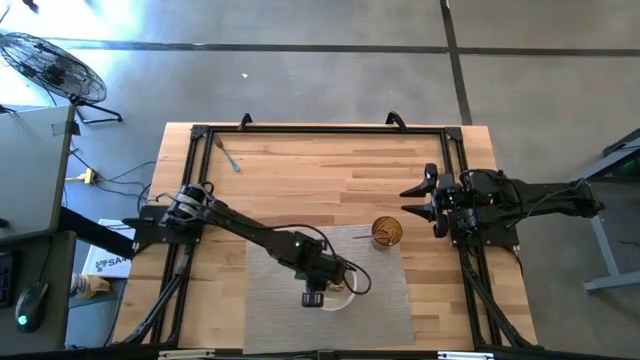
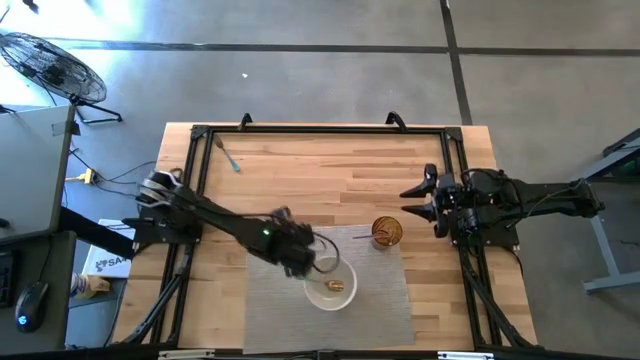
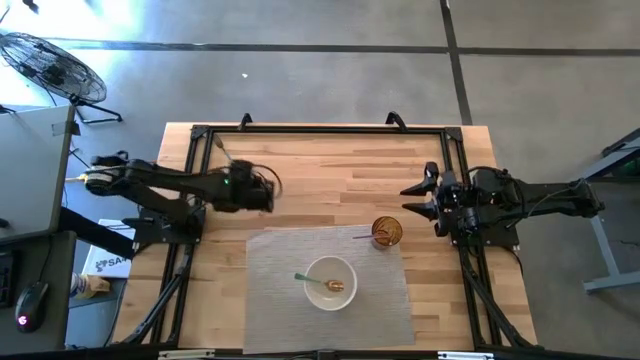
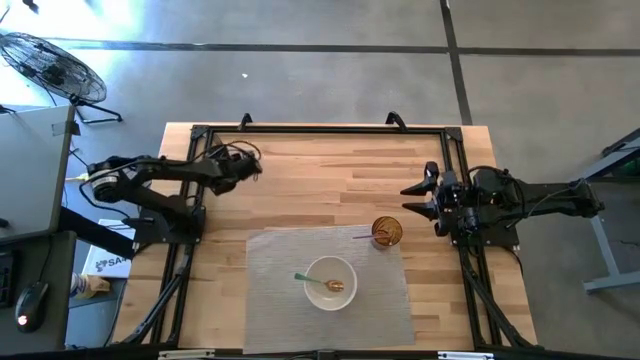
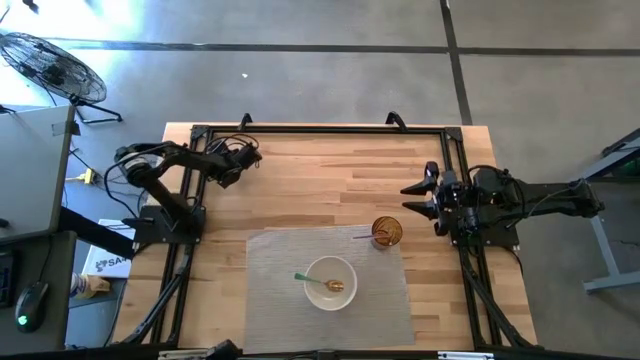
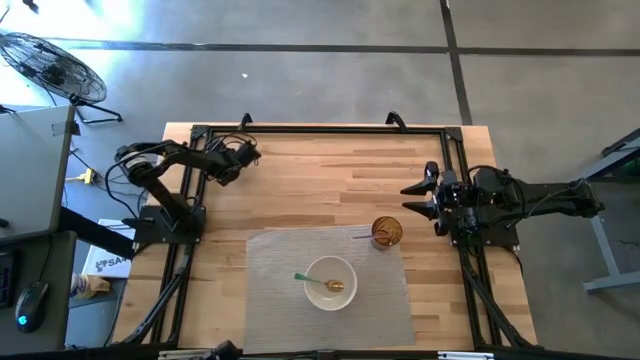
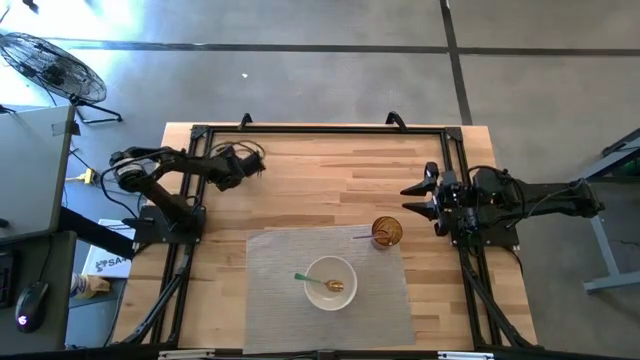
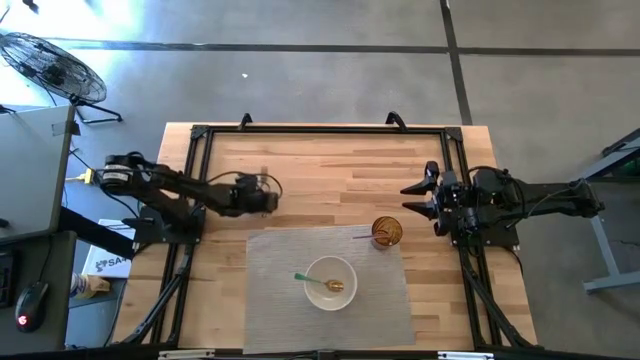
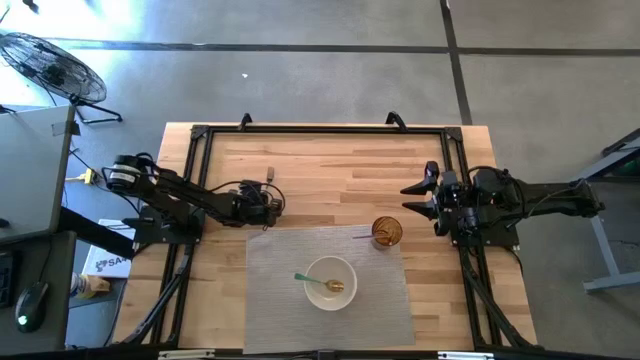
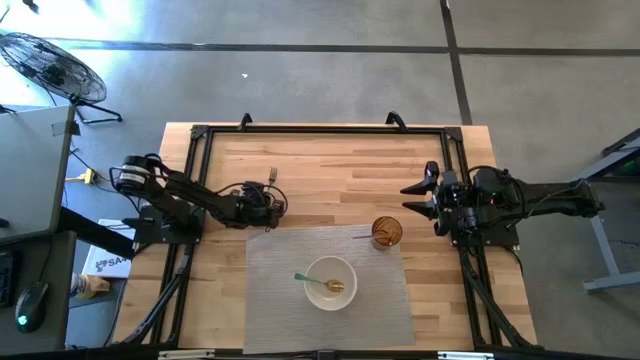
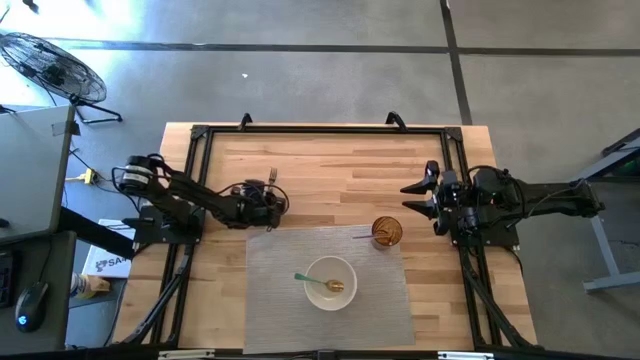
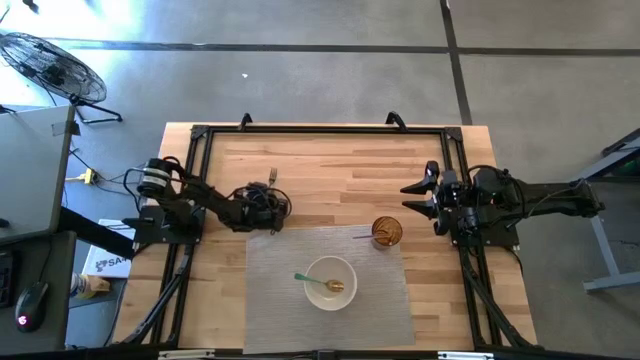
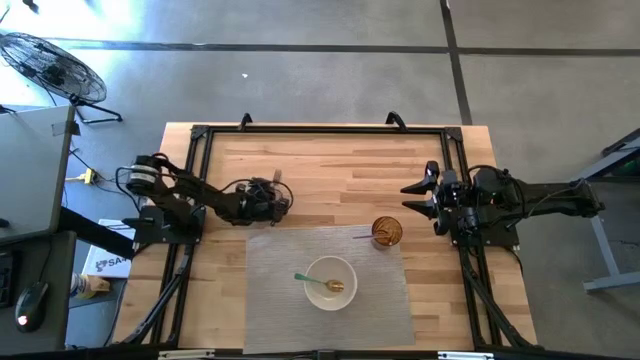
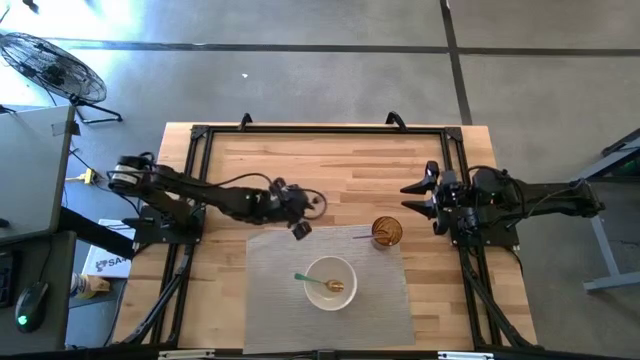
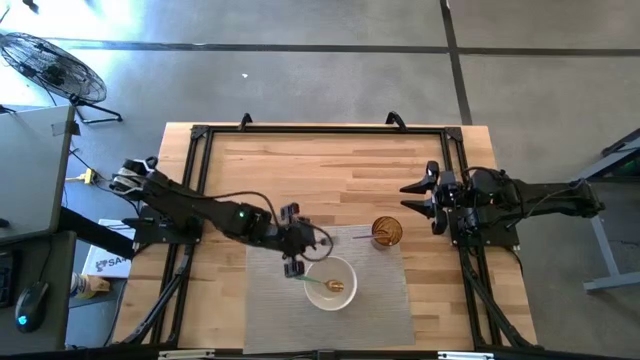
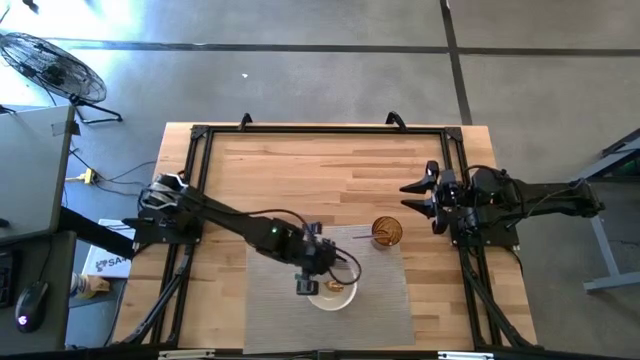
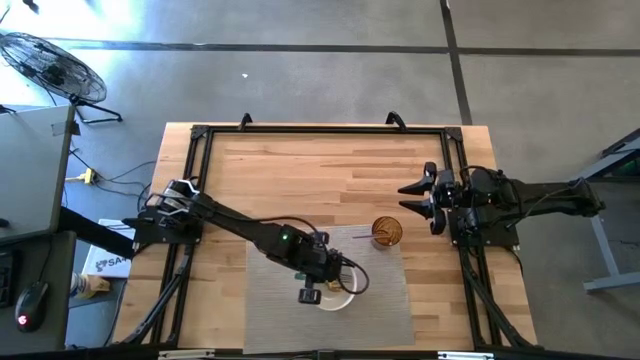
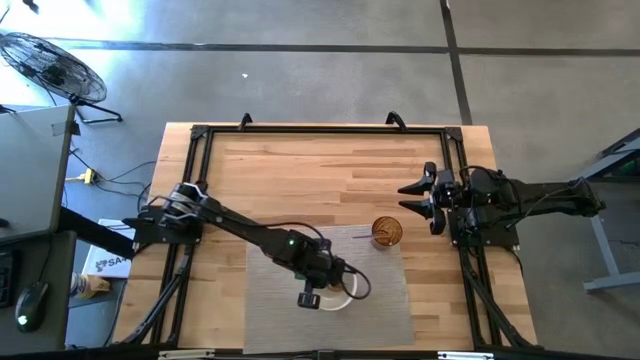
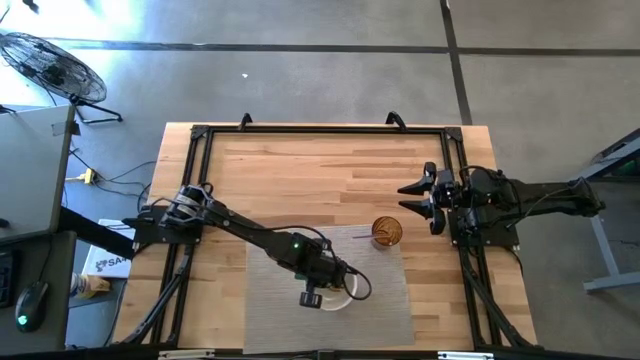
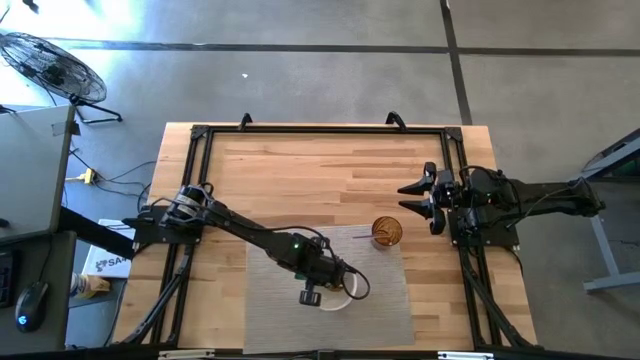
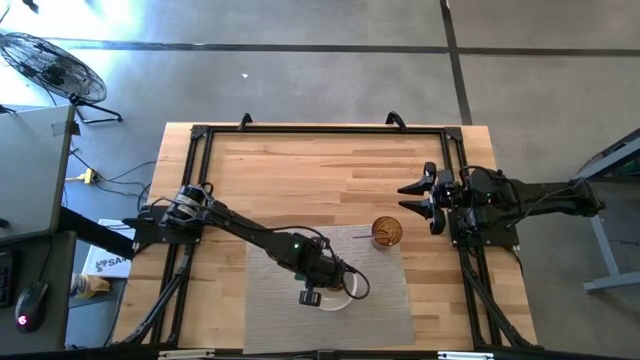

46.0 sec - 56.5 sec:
Task: Pick & Place Utensil
Put the blue fork into the white bowl on the gray mat

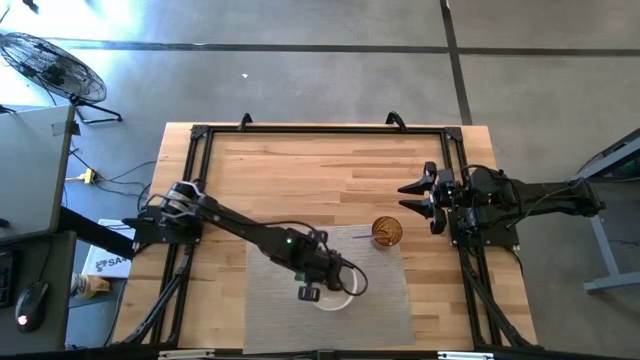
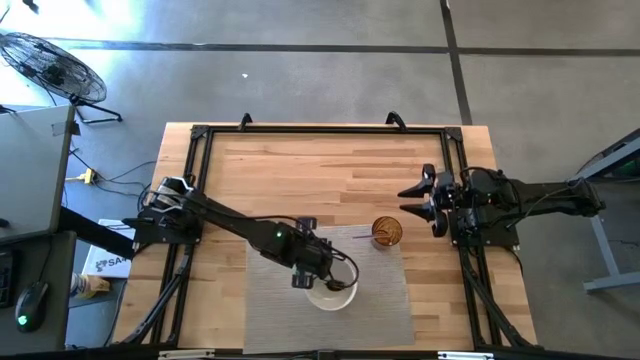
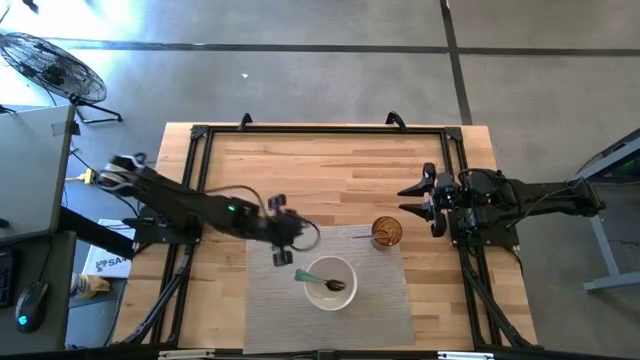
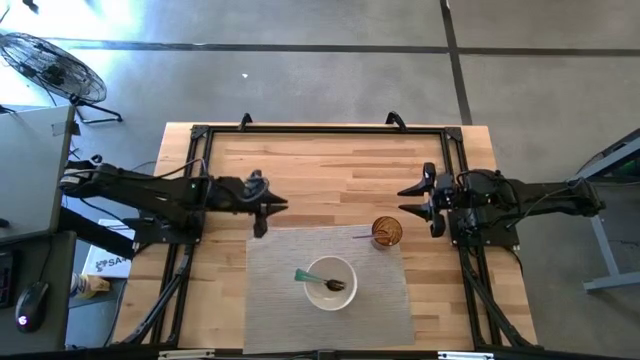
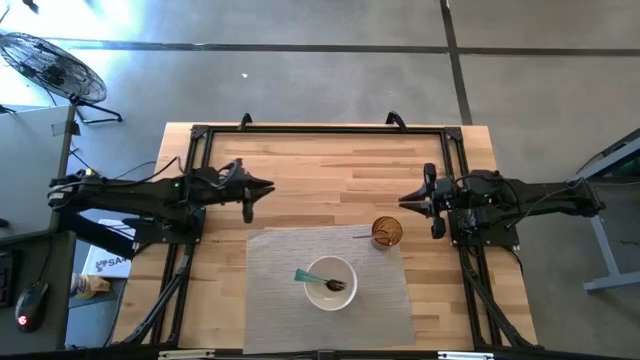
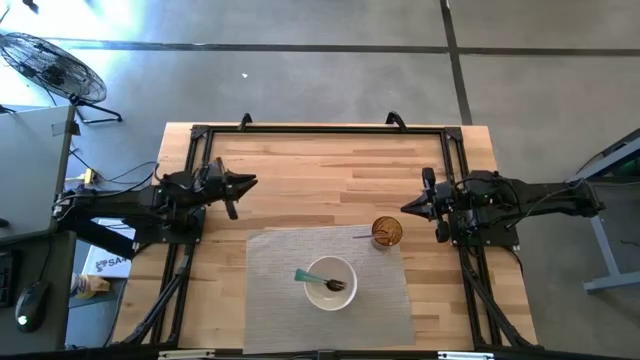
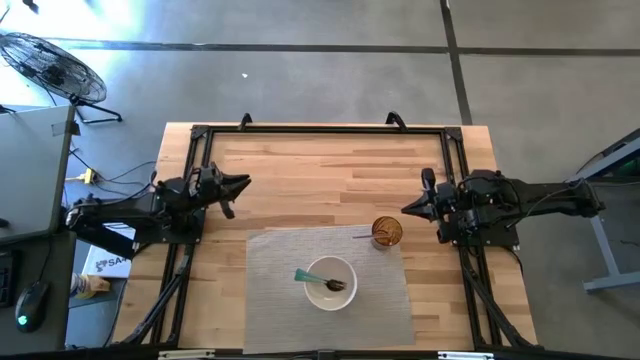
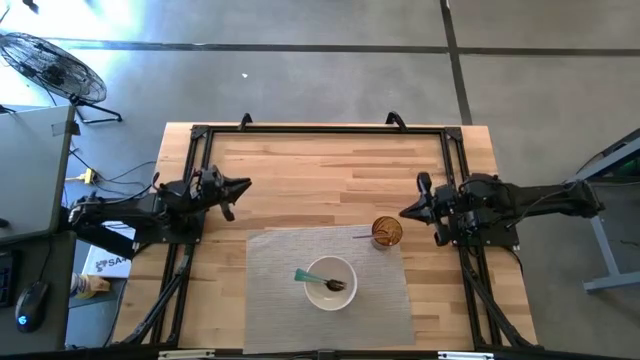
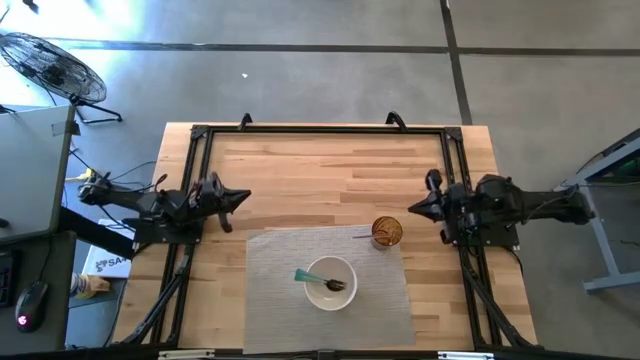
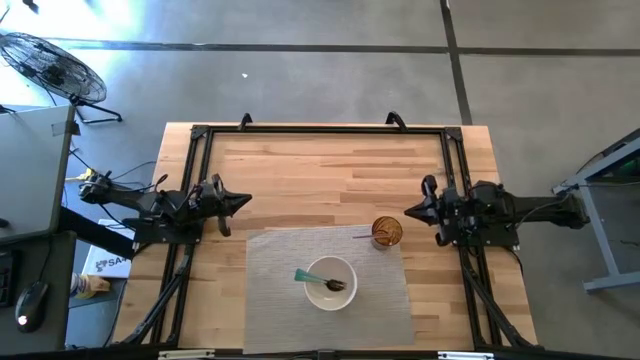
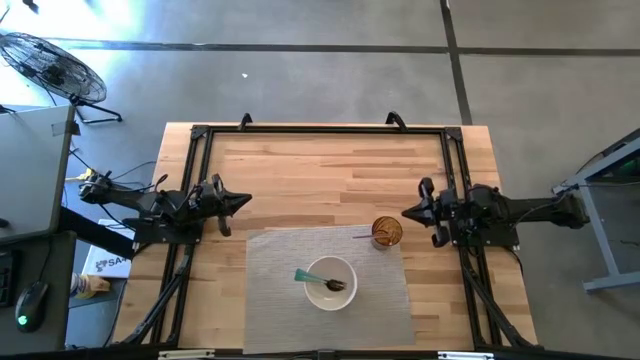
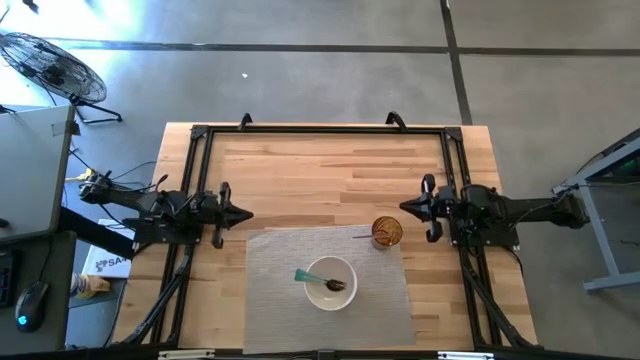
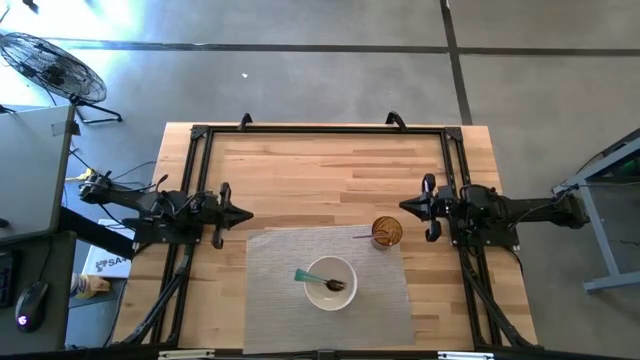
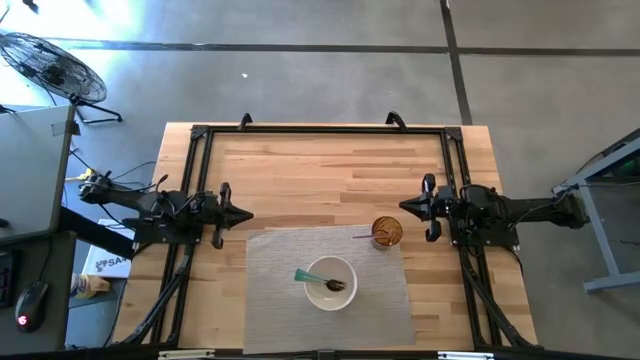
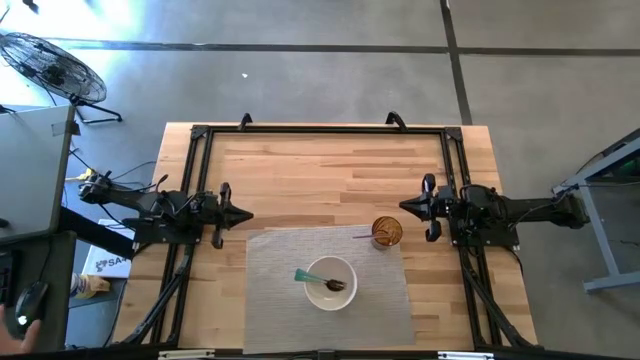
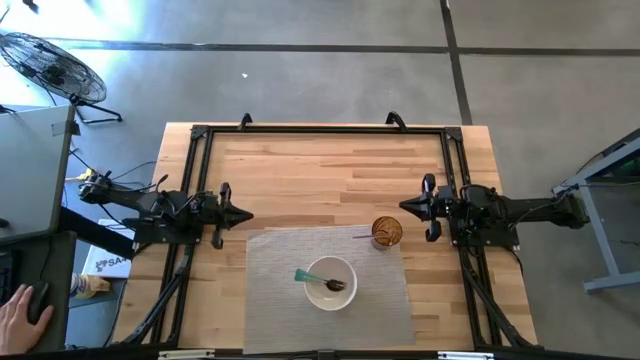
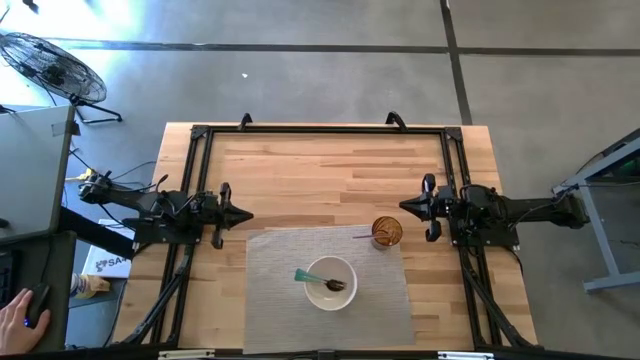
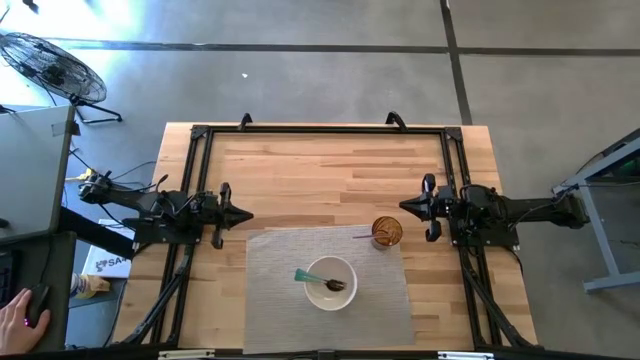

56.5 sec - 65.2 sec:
Return to Home Position

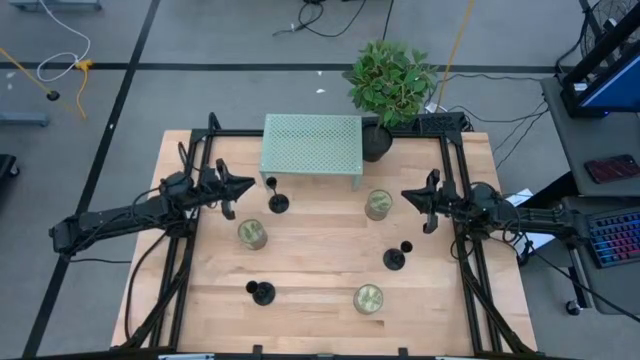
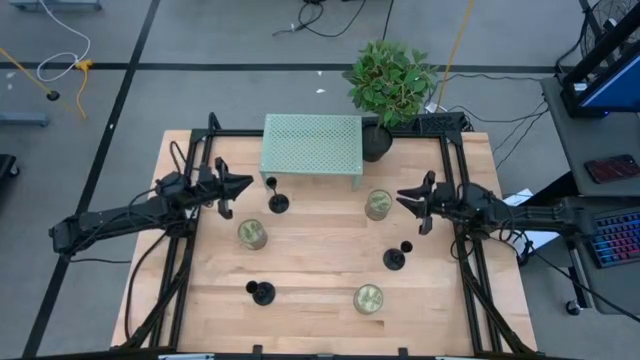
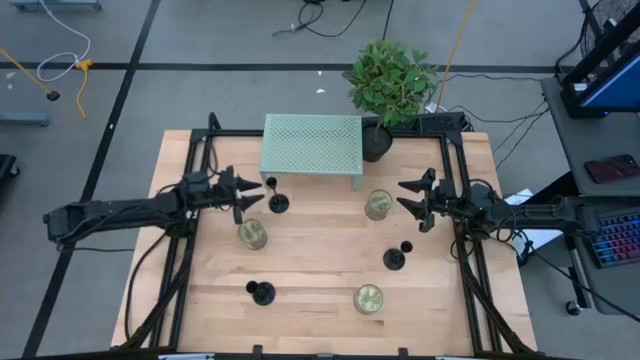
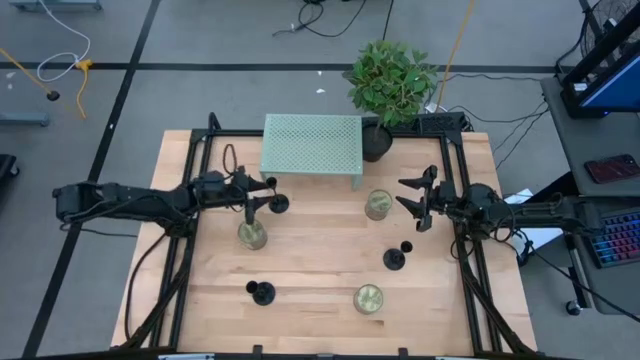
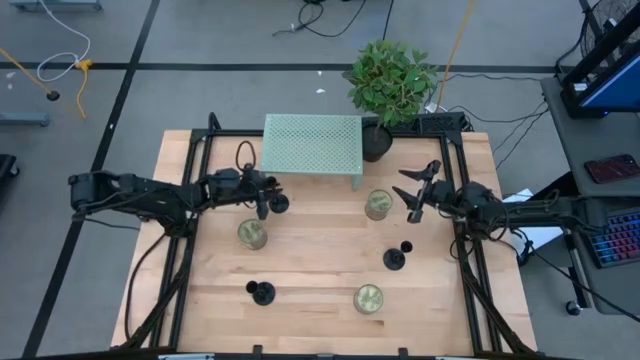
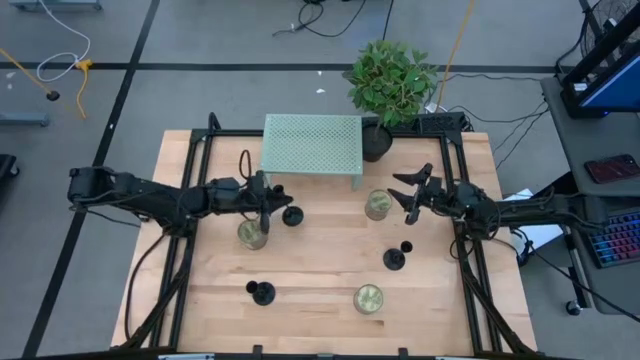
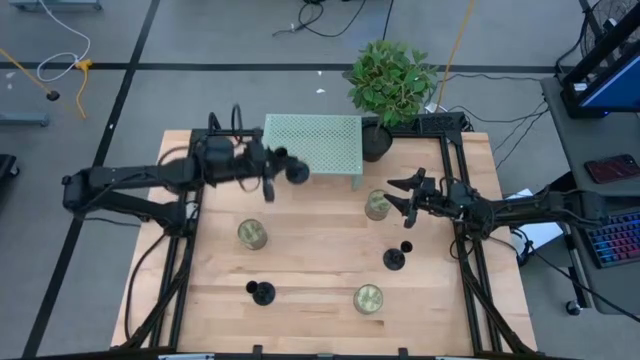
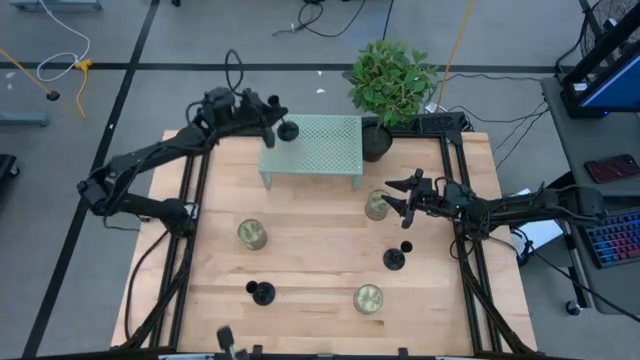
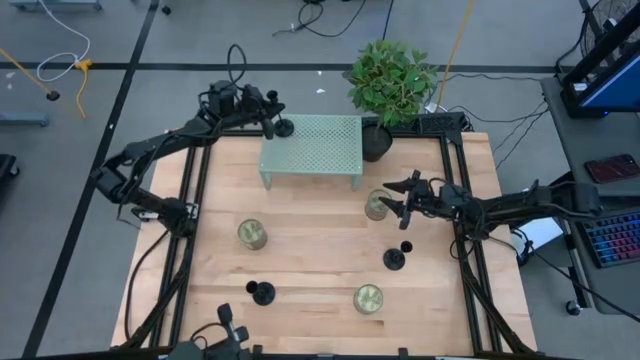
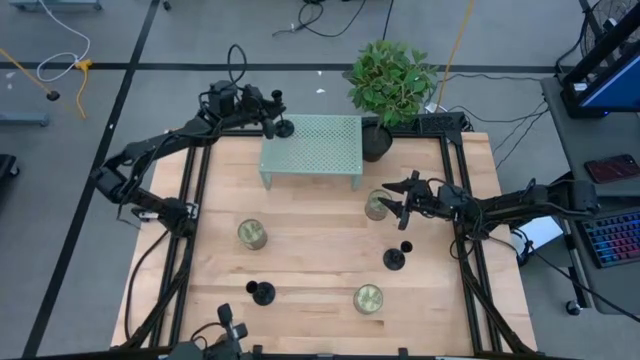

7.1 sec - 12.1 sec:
Task: Pick & Place candle stick holders
Put the top candle holder on the shelf
